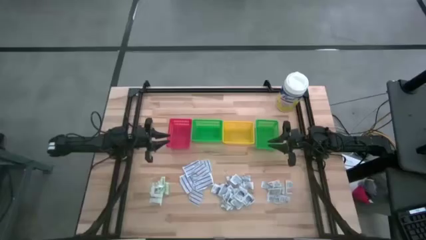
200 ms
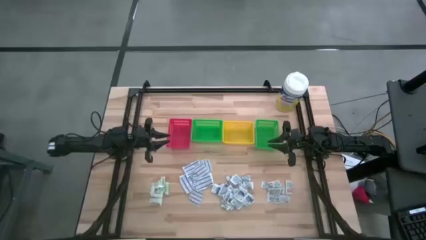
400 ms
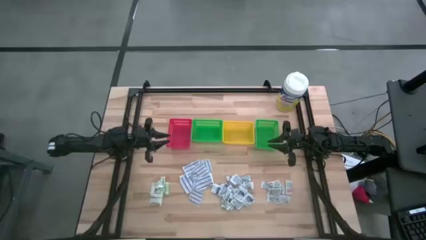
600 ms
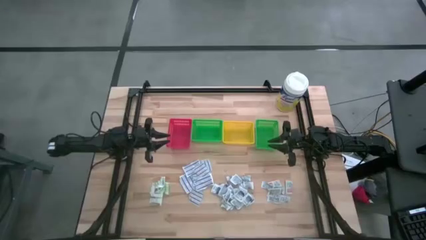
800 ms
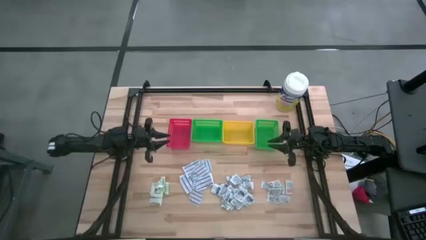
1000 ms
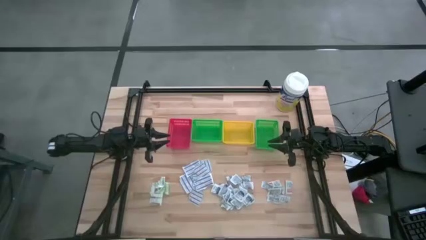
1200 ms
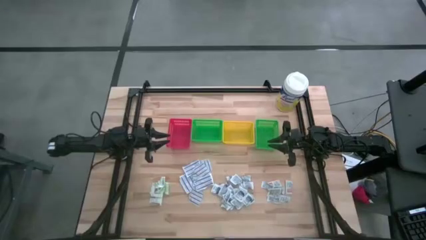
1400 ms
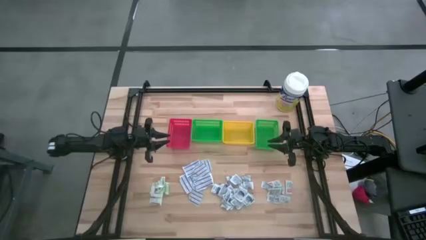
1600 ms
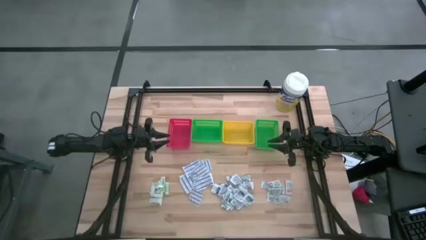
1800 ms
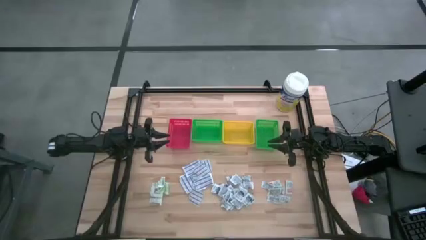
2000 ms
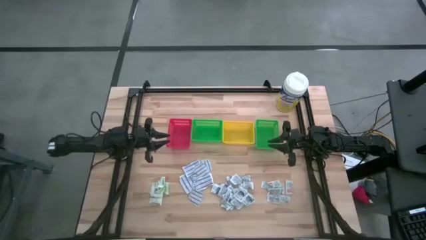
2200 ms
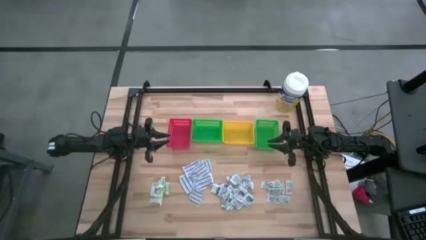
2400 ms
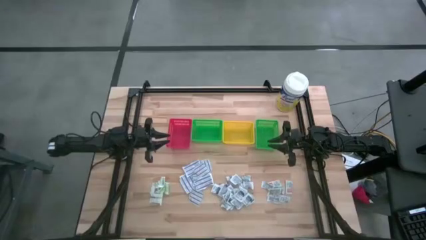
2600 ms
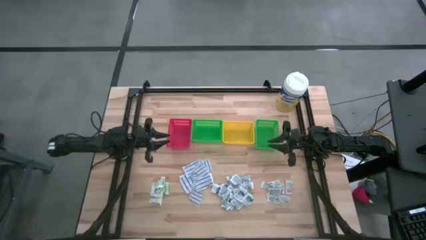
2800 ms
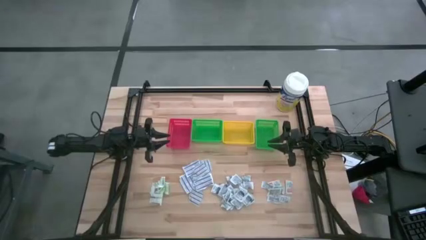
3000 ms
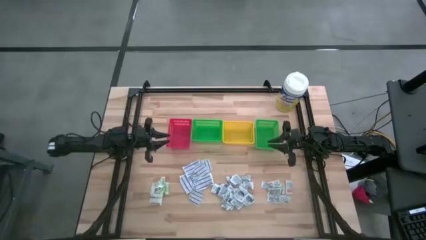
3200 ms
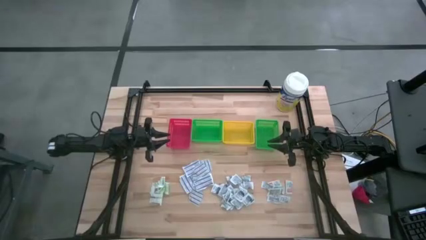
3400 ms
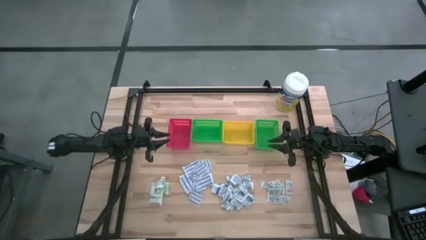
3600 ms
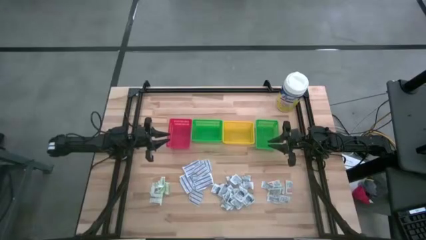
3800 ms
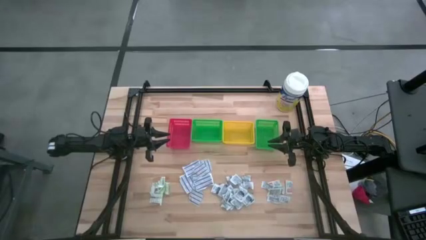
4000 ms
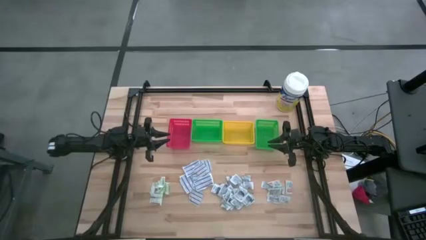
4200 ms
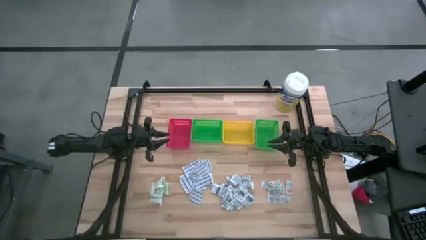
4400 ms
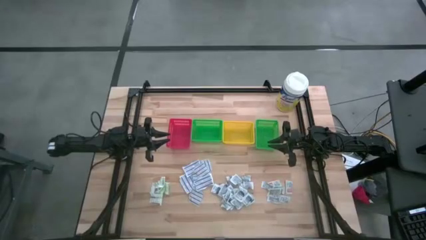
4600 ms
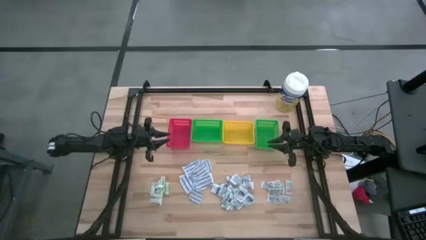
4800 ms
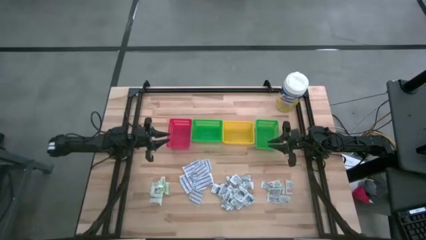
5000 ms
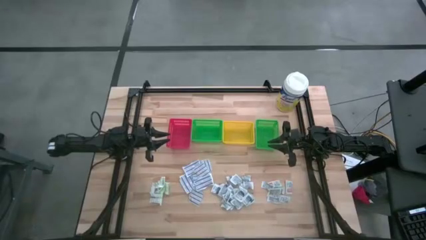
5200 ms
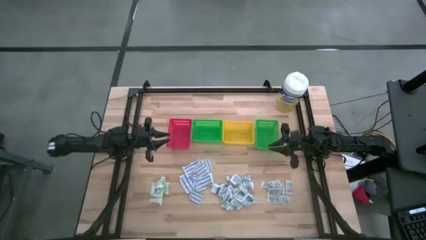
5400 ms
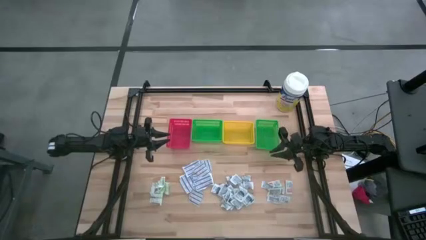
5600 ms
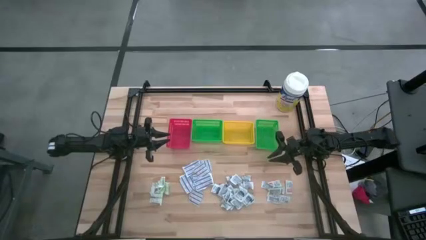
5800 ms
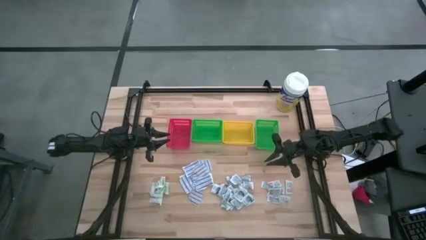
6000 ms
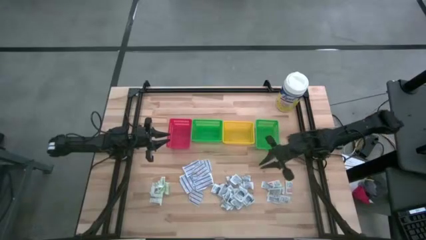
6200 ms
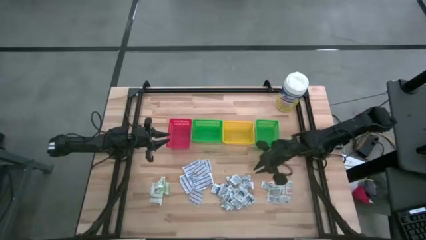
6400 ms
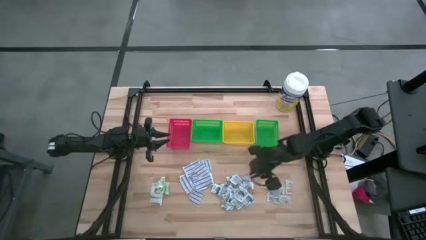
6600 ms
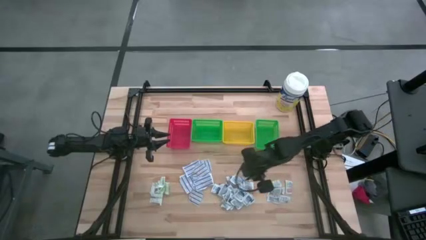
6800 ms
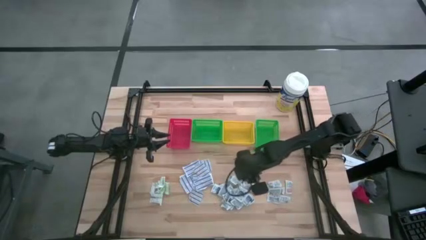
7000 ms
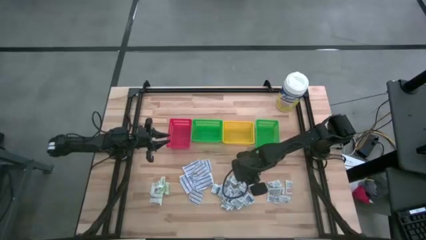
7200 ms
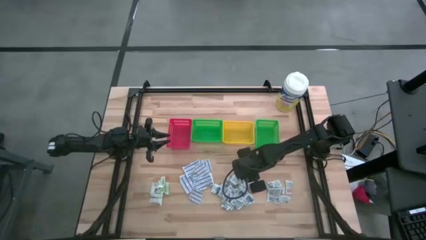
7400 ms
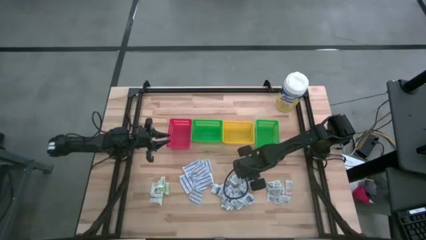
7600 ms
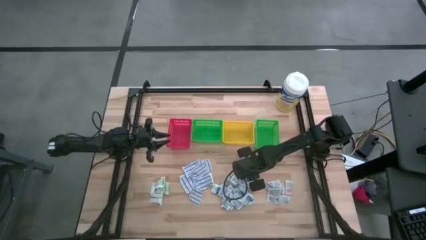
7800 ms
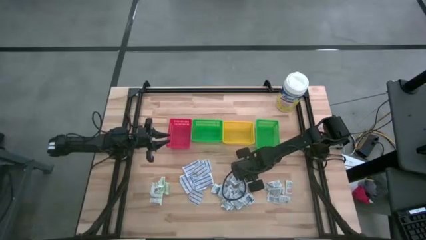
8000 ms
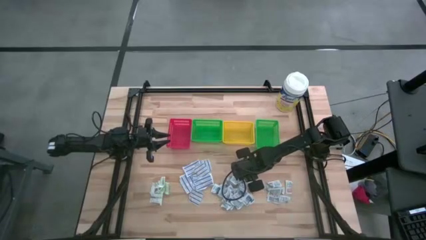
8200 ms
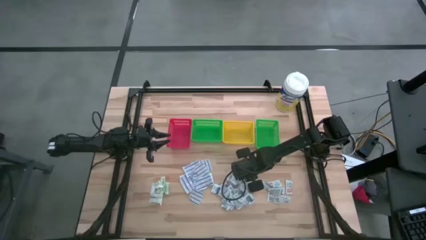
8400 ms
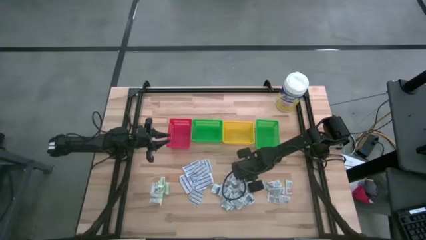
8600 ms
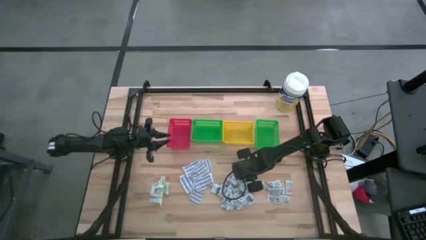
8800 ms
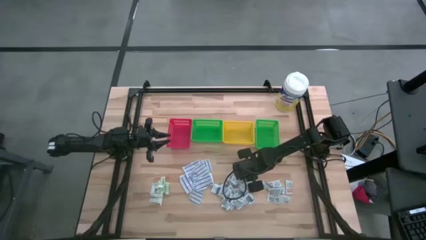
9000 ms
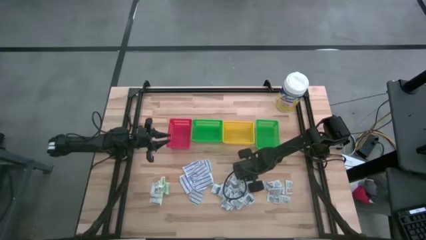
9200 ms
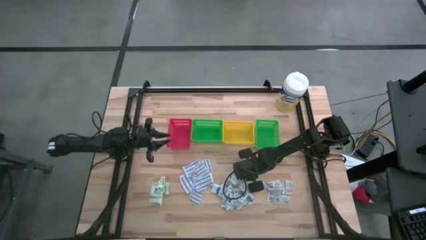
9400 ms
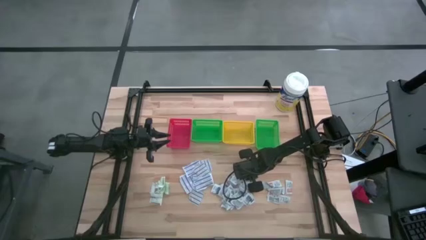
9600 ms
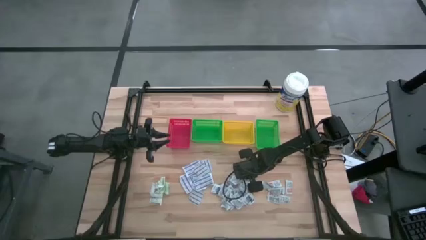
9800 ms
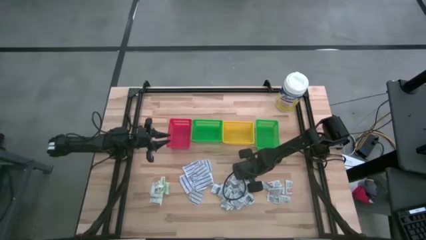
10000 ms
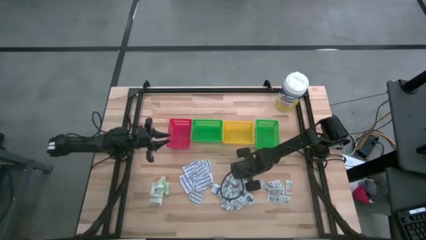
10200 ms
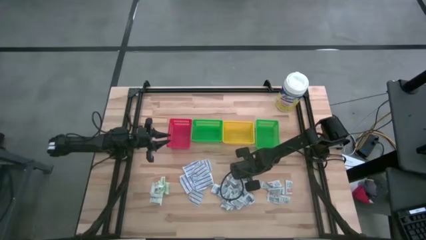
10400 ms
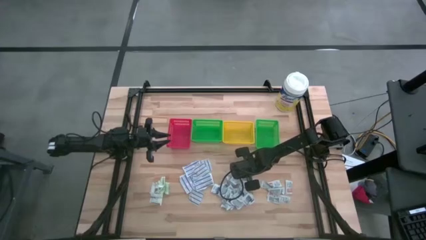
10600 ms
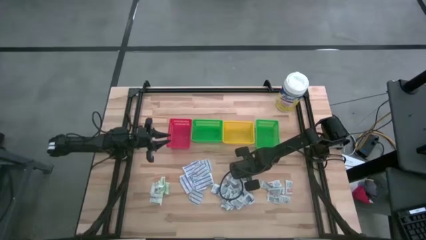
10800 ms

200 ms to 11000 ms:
Task: Pick & Place First Aid Supplies
Put the blue alcohol pad into the right green bin

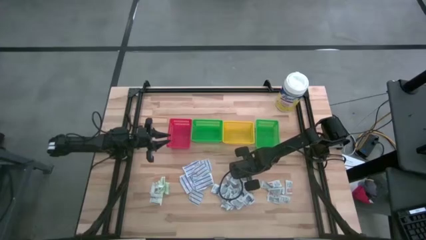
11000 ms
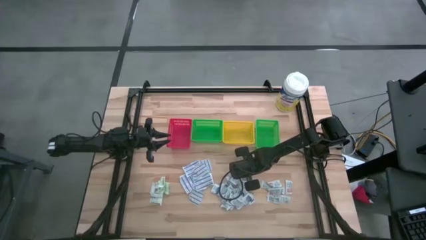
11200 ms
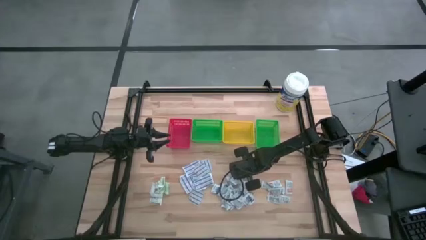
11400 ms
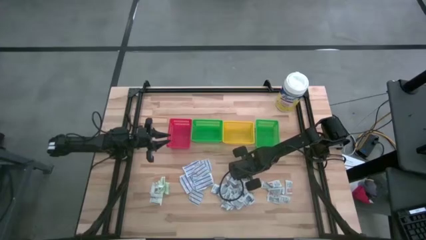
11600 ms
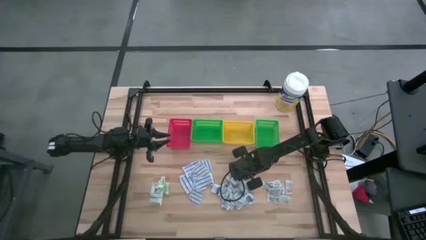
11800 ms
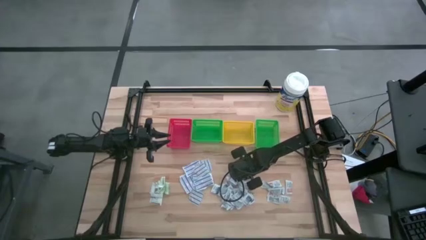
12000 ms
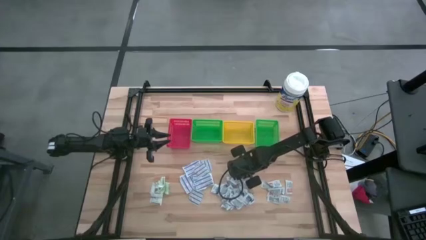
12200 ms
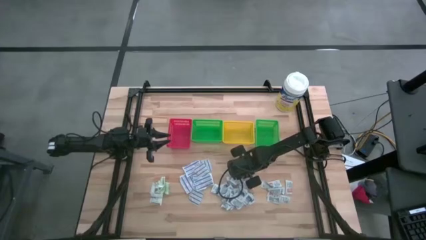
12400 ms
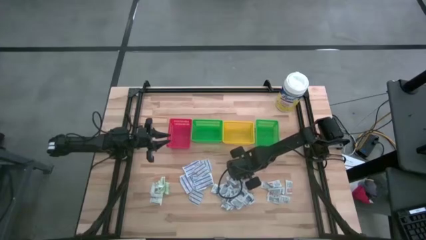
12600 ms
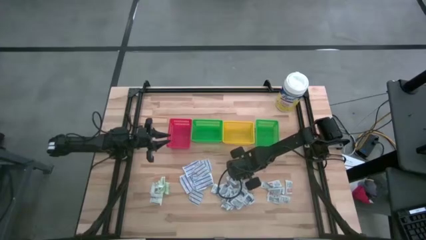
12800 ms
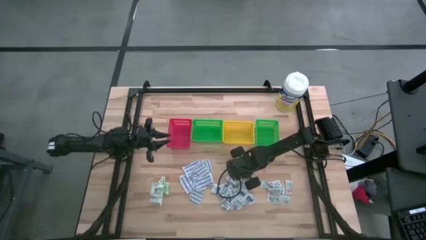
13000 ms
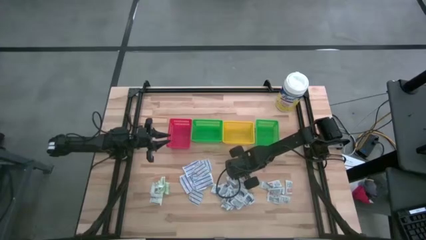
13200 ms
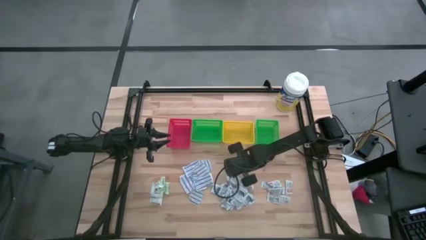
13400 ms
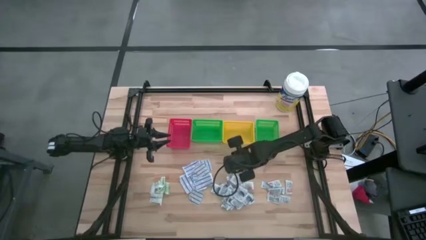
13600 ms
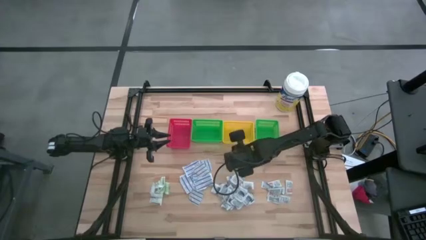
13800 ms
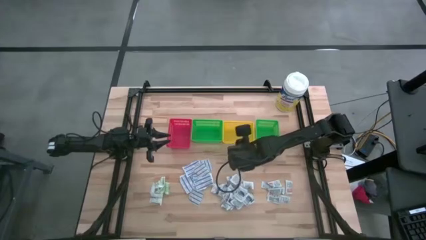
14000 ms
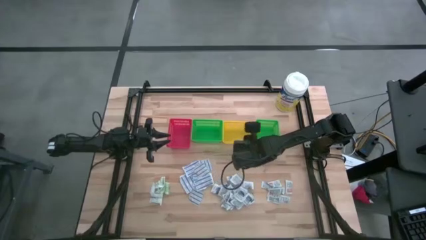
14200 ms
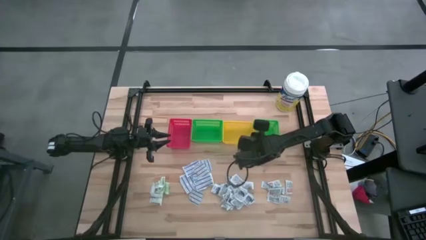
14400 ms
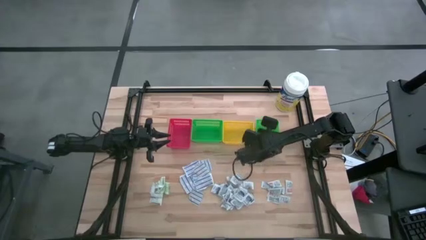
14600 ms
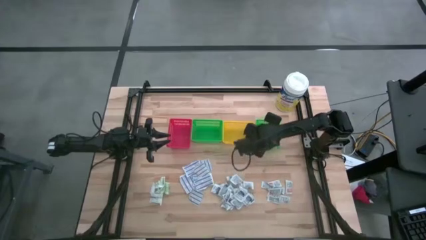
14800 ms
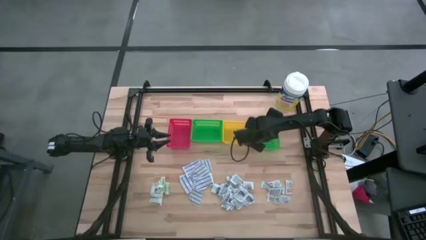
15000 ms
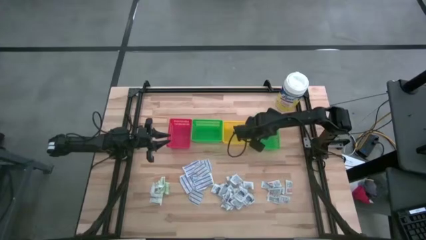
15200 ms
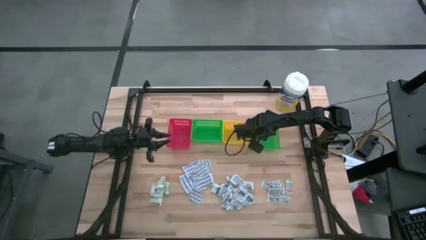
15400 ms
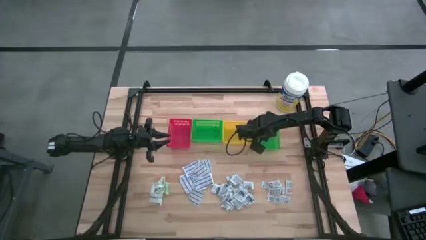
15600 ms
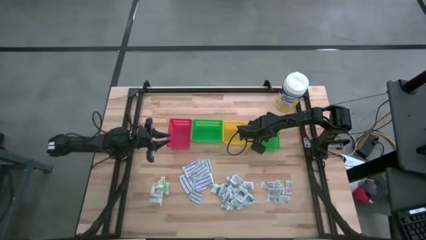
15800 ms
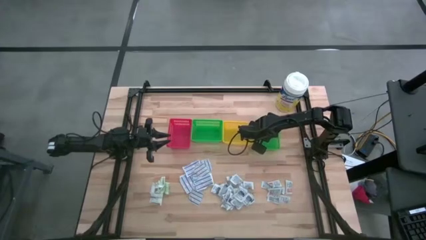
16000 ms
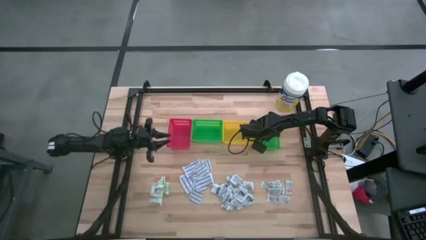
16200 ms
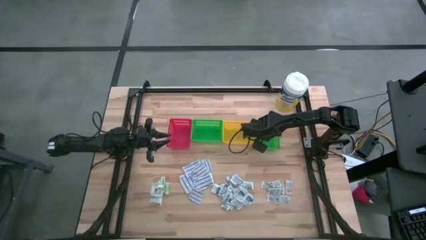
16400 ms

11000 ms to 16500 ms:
Put the blue alcohol pad into the right green bin
